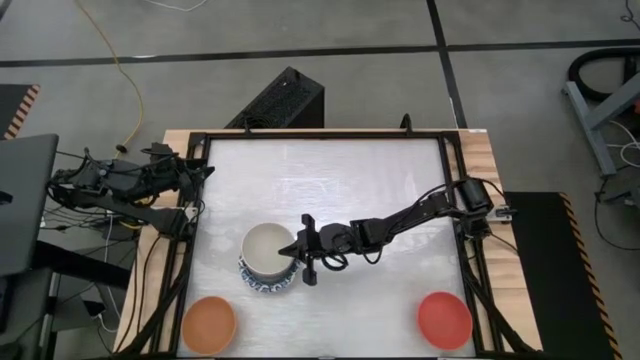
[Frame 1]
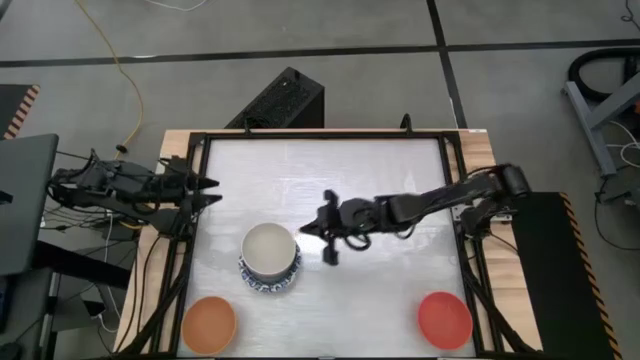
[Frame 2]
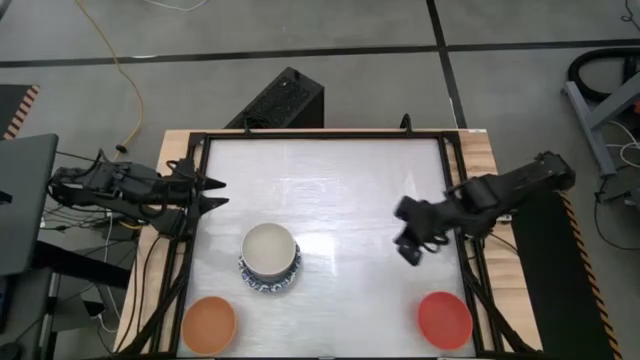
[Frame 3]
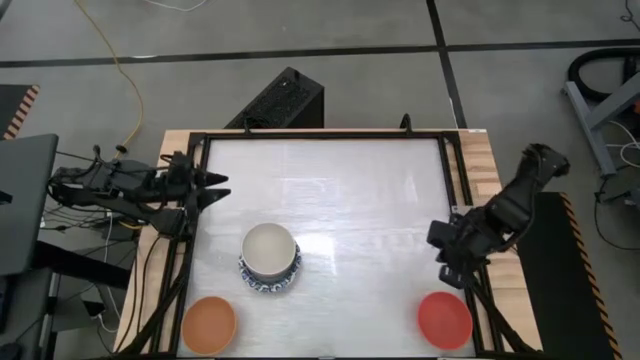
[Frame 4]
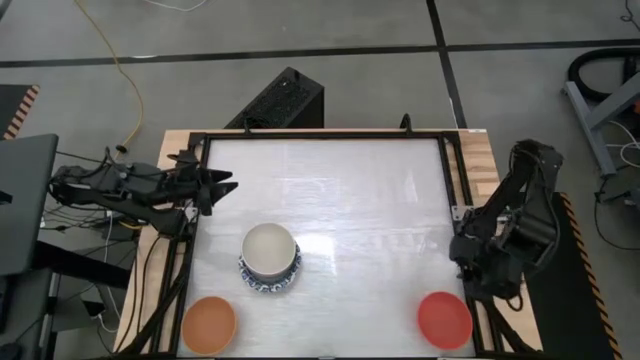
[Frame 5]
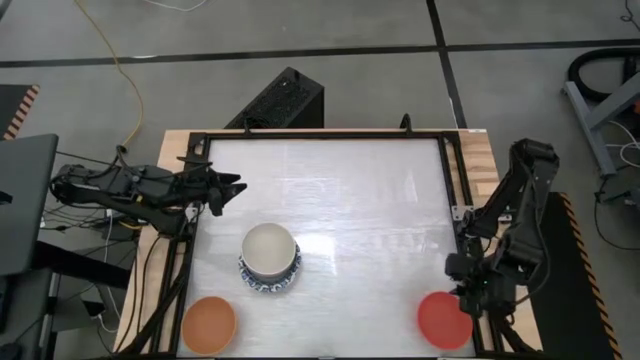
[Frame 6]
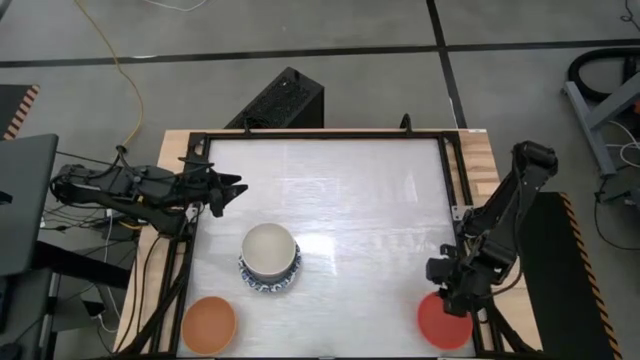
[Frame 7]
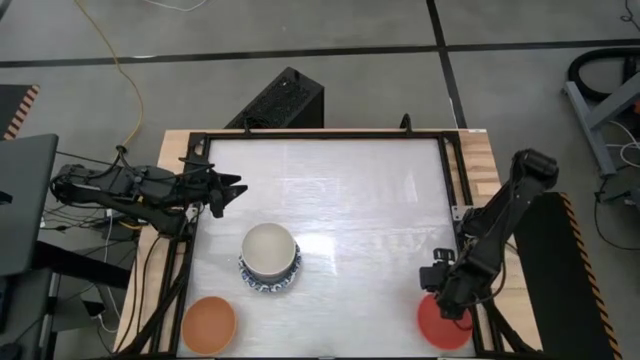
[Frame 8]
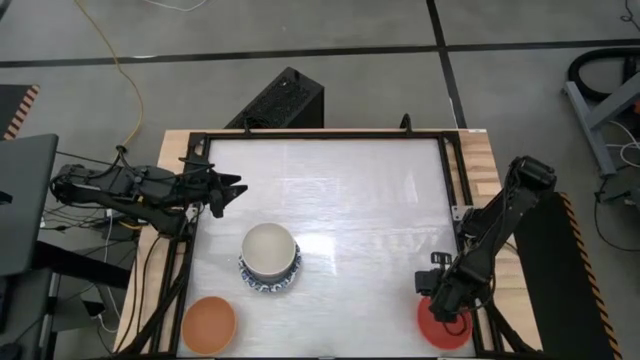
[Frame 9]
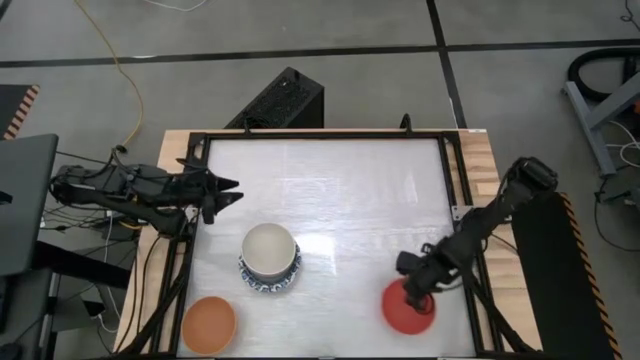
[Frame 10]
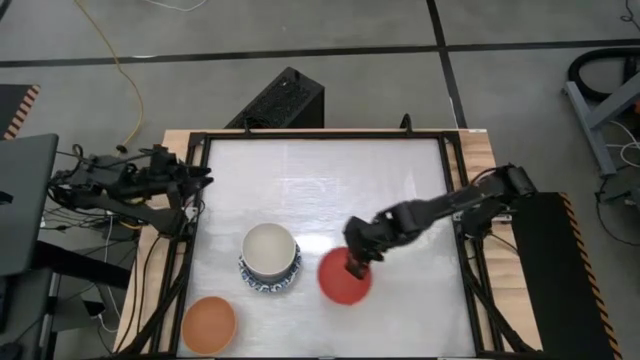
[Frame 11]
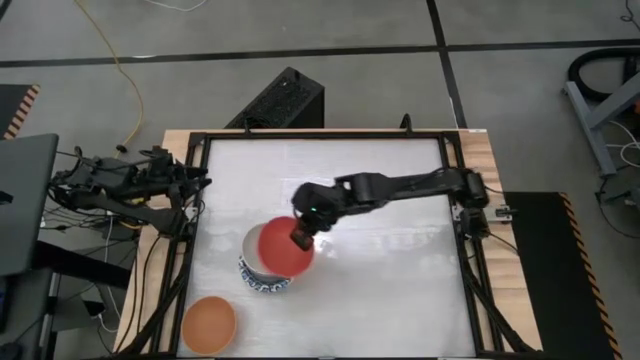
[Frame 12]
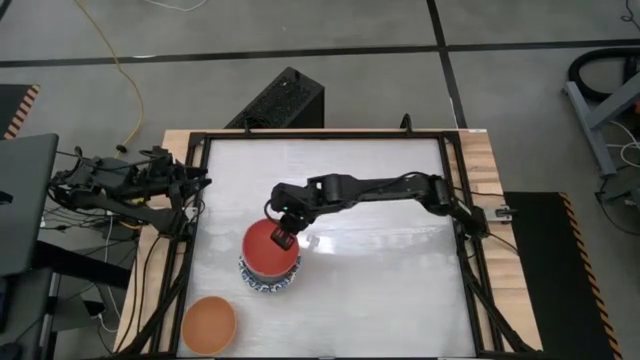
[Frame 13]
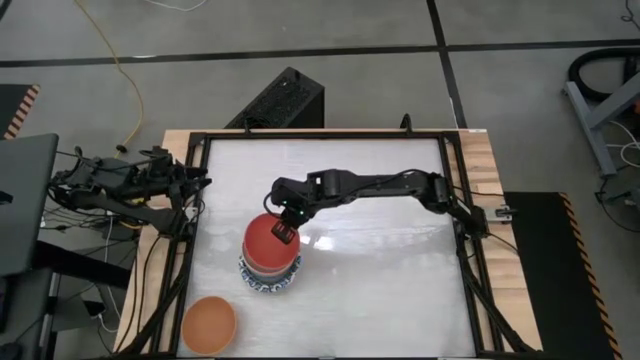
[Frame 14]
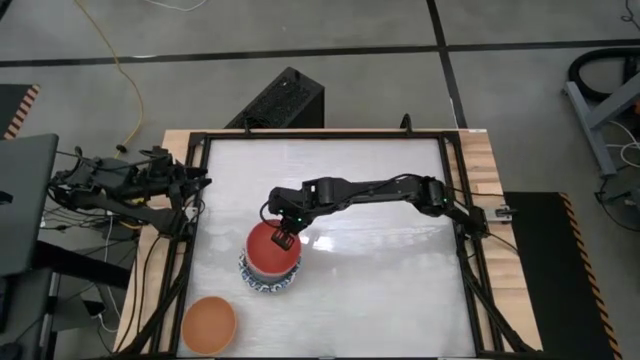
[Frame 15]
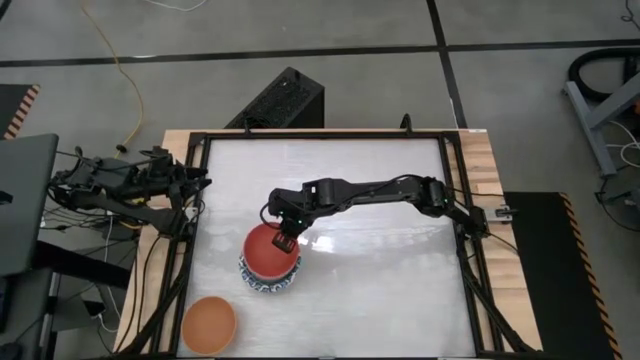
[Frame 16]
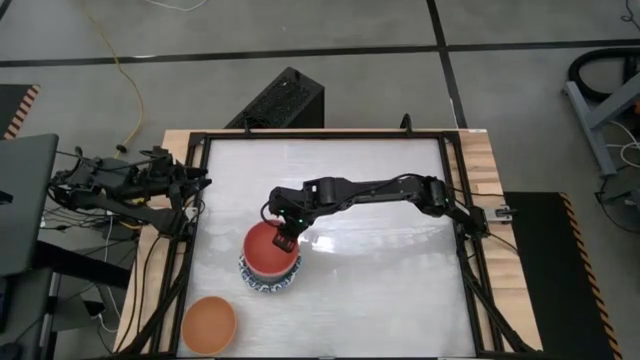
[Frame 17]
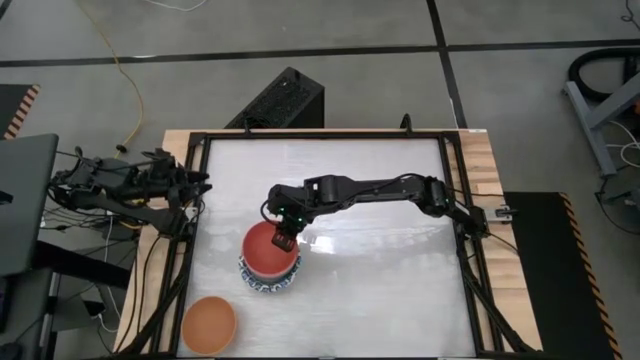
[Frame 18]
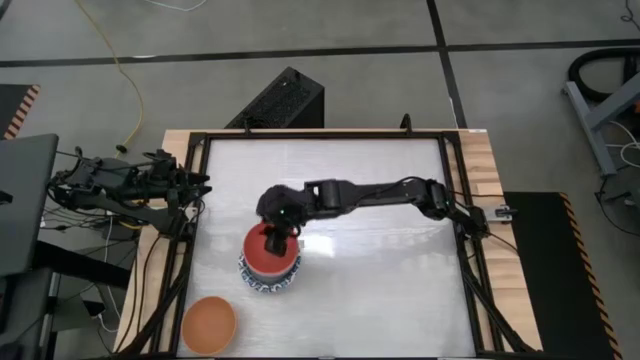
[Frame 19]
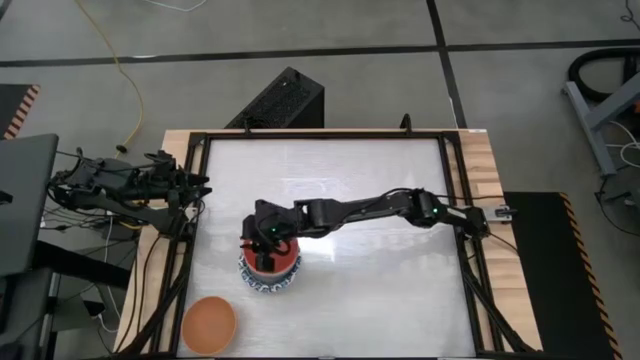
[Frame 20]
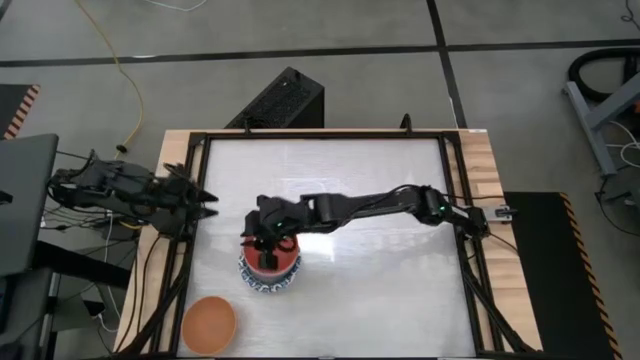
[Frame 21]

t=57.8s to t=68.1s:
Stack the orange bowl on top of the white bowl

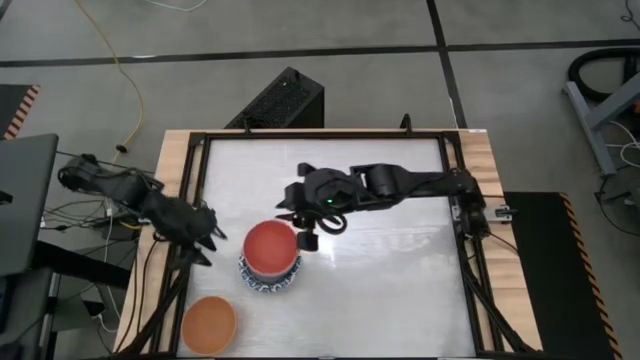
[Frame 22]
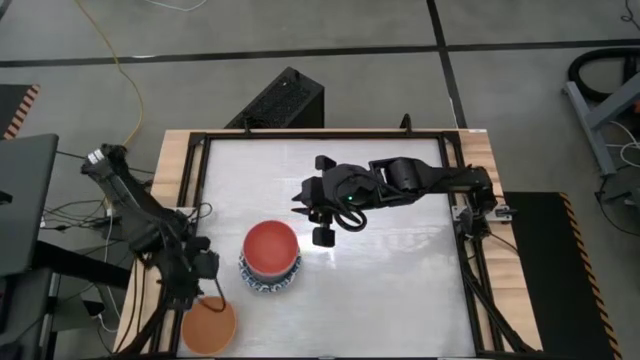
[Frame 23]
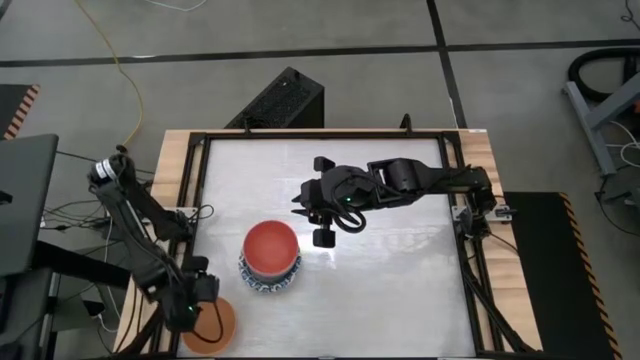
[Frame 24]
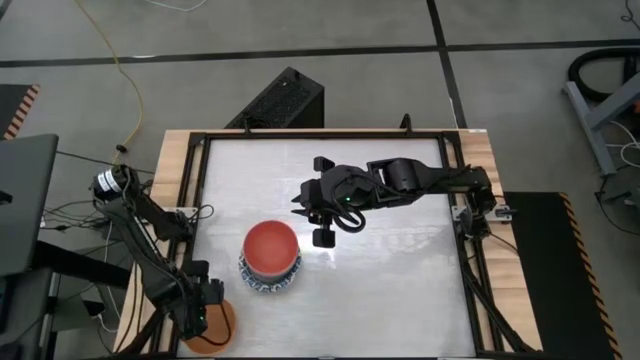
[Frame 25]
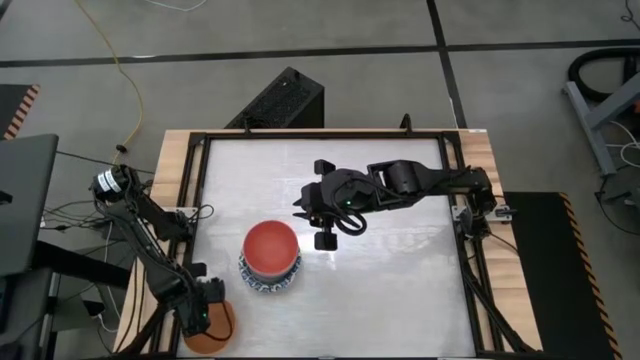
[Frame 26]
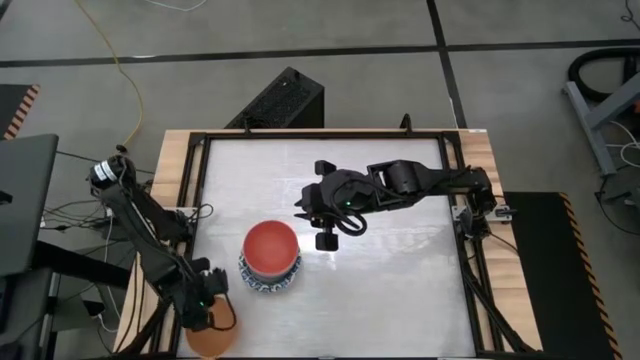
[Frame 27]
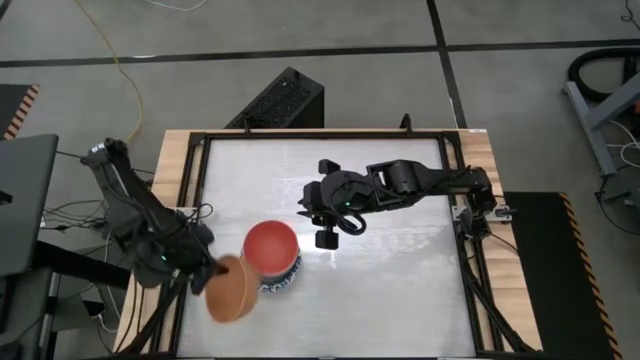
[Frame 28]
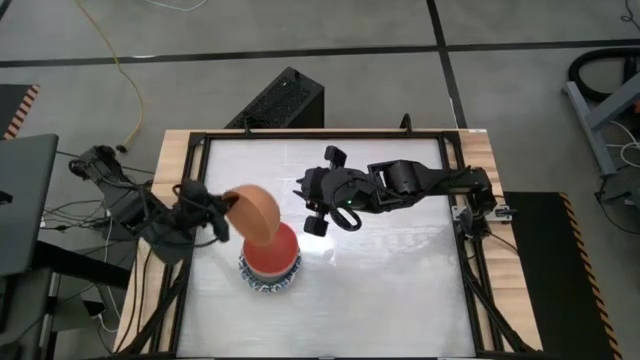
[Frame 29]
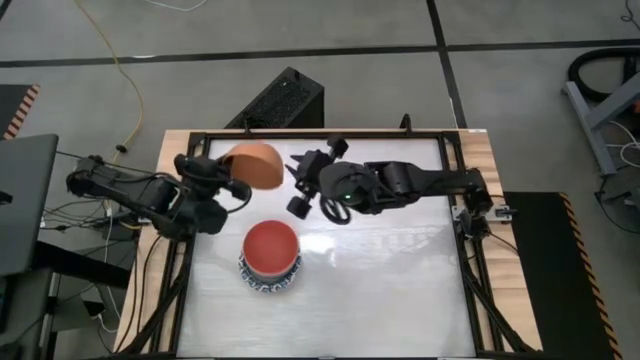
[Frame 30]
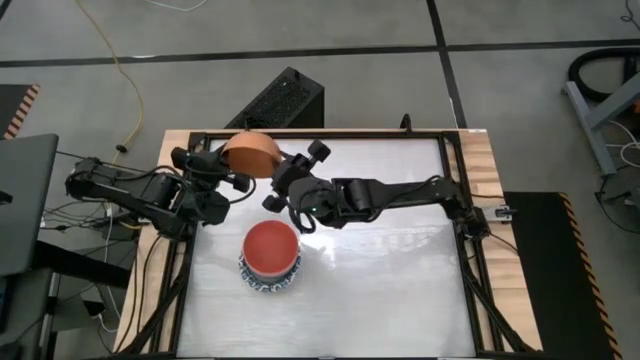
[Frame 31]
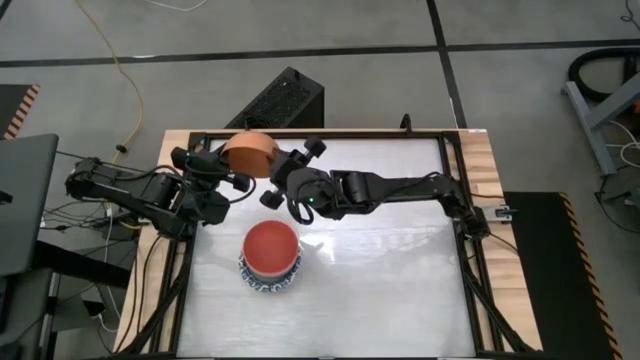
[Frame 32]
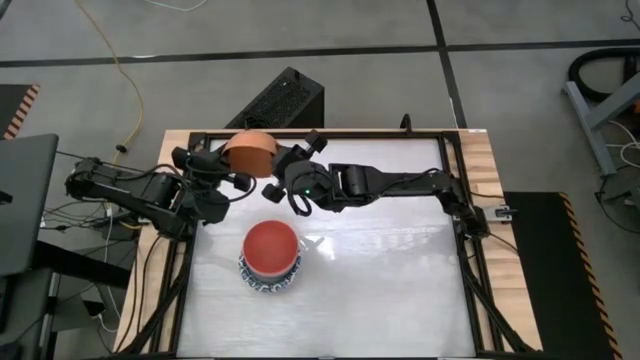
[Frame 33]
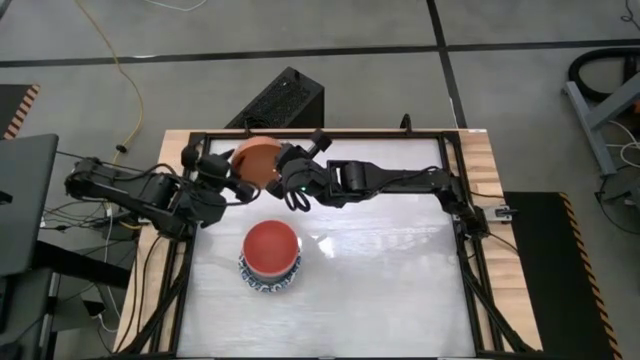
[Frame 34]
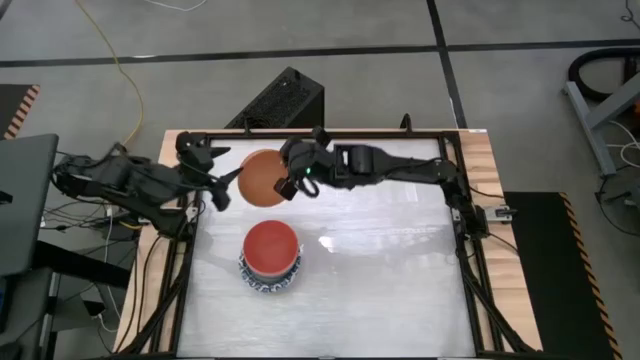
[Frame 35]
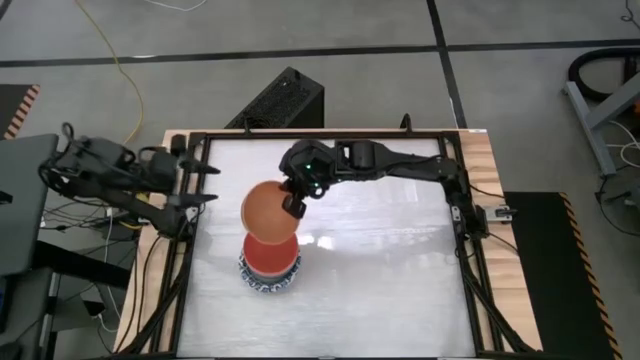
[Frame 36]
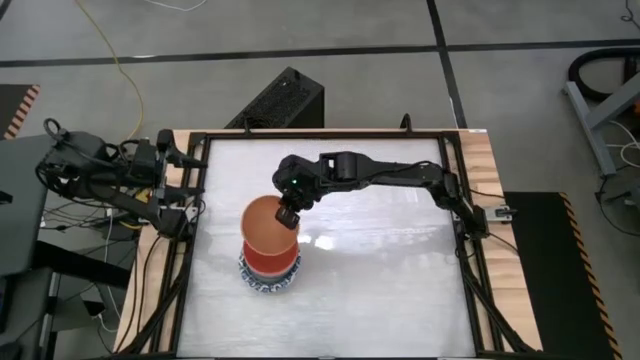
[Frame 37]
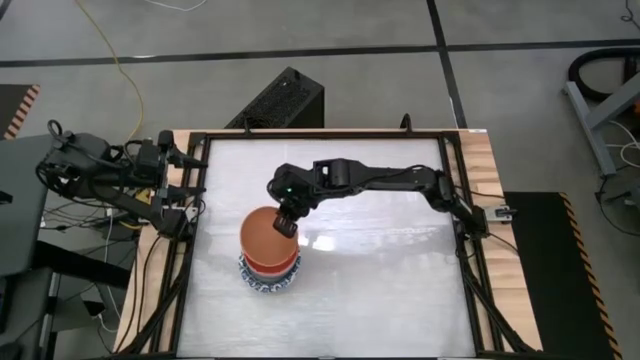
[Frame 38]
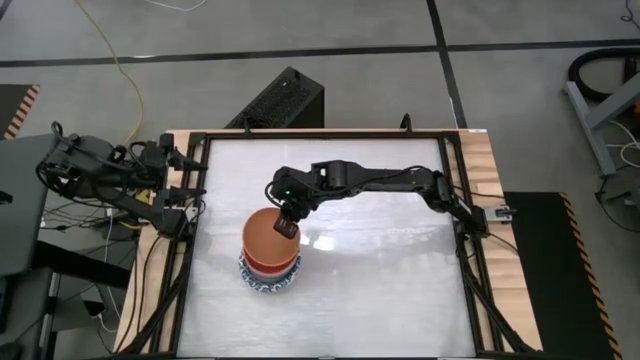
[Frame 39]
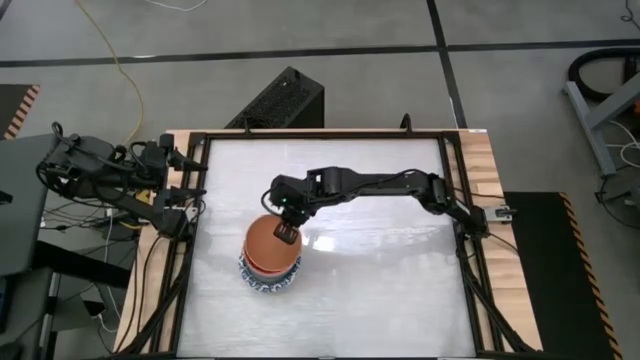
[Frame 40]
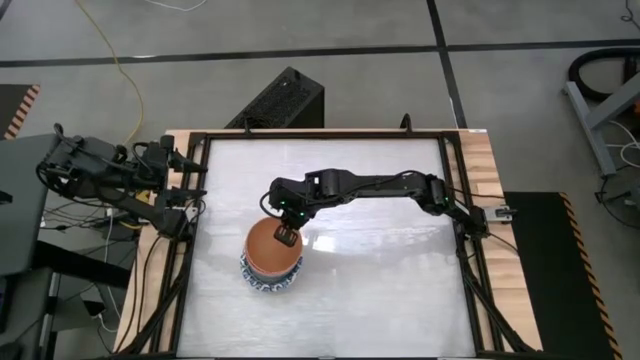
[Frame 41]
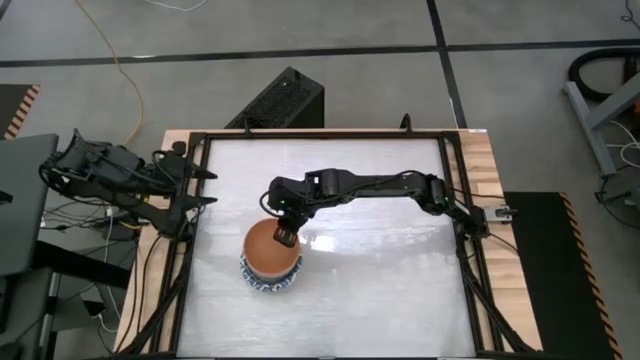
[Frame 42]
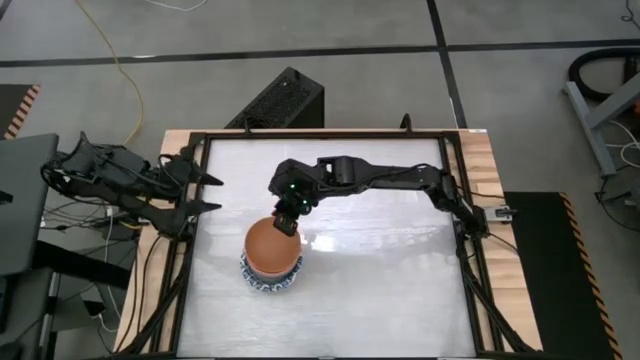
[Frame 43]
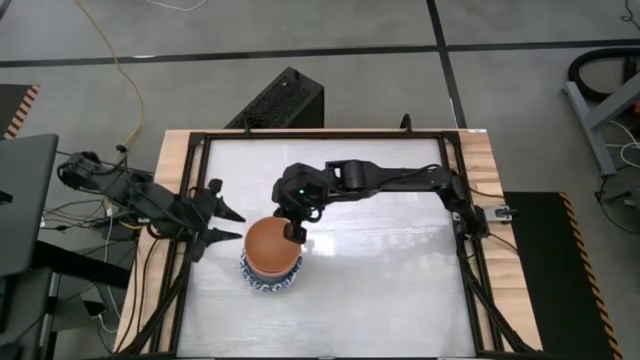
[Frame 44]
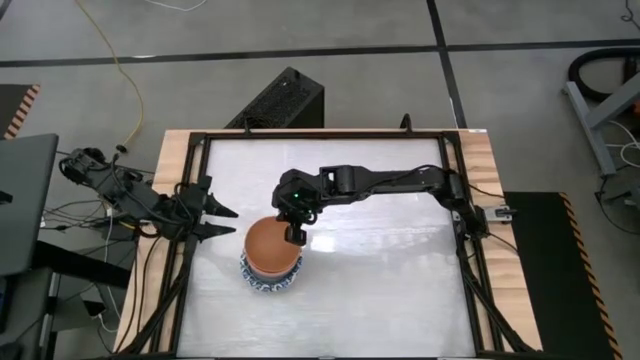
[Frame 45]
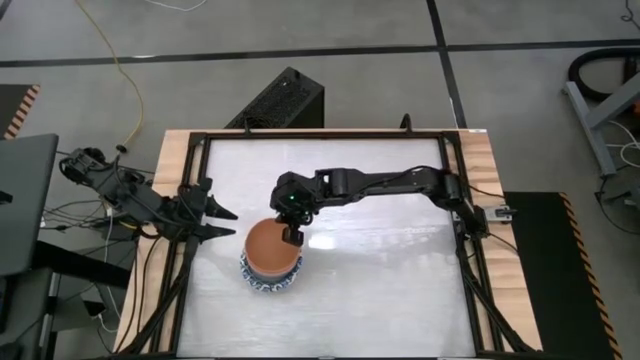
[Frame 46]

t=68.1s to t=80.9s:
Stack the light orange bowl on top of the orange bowl
